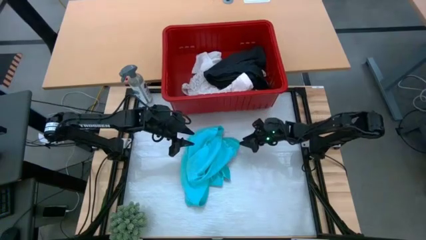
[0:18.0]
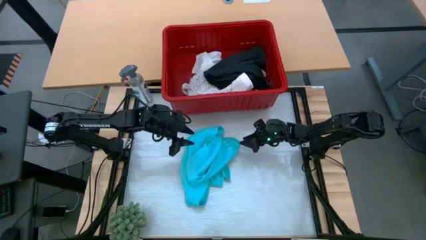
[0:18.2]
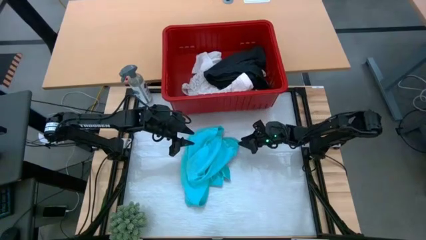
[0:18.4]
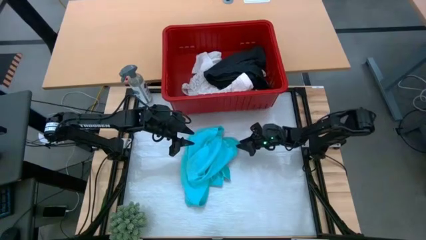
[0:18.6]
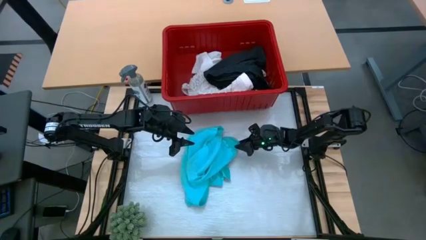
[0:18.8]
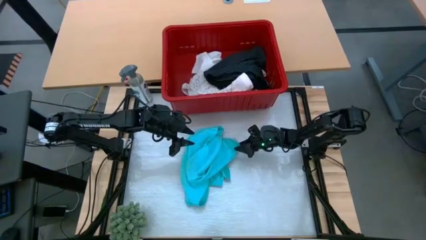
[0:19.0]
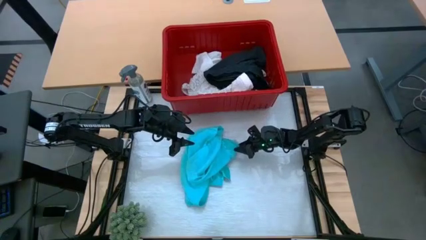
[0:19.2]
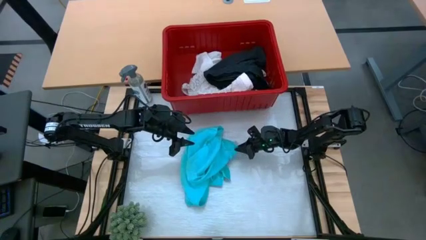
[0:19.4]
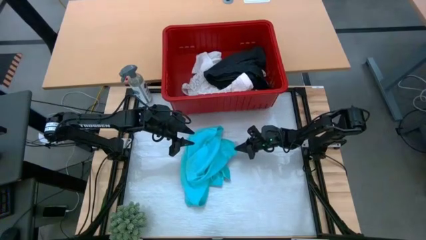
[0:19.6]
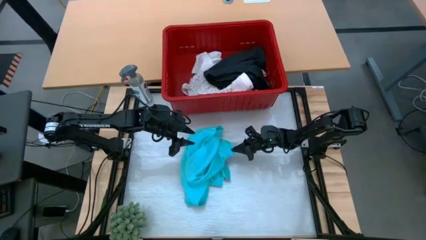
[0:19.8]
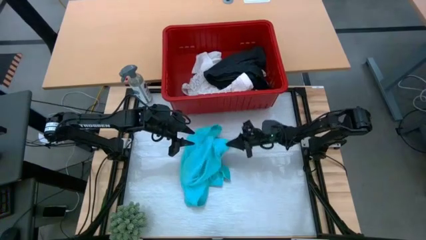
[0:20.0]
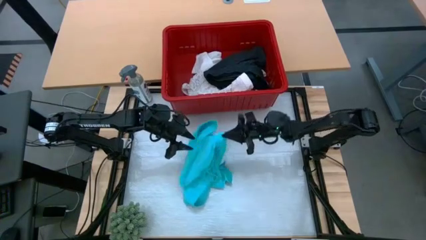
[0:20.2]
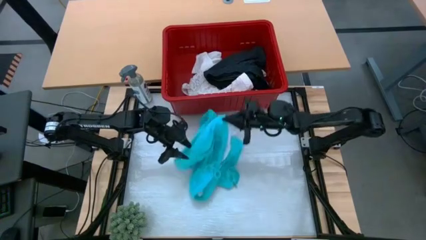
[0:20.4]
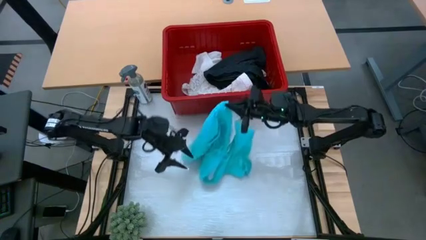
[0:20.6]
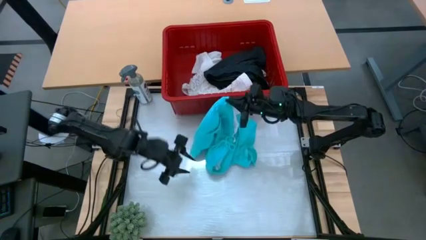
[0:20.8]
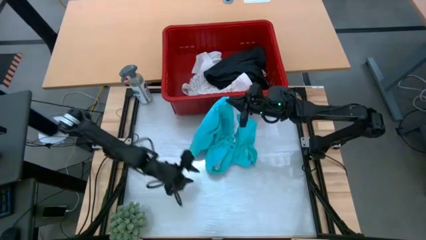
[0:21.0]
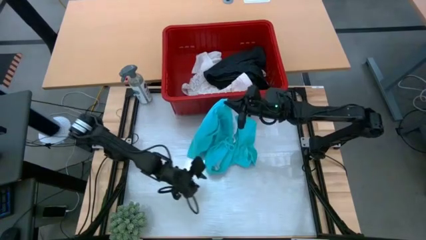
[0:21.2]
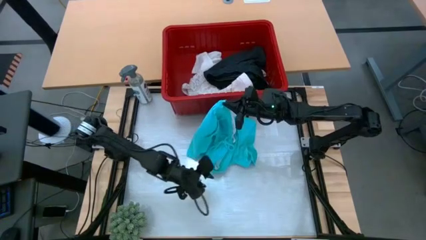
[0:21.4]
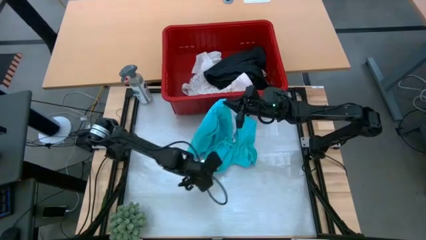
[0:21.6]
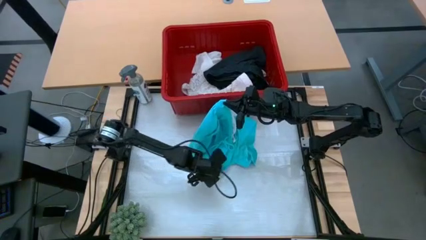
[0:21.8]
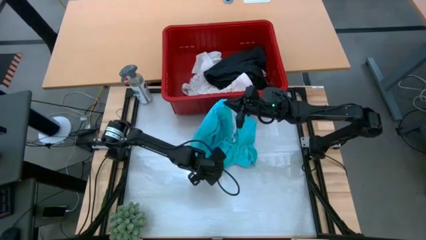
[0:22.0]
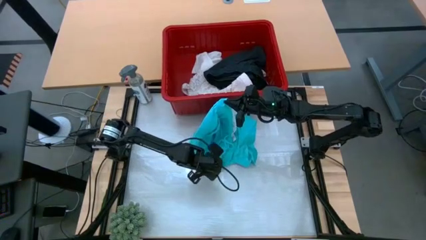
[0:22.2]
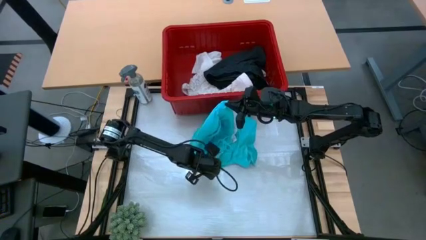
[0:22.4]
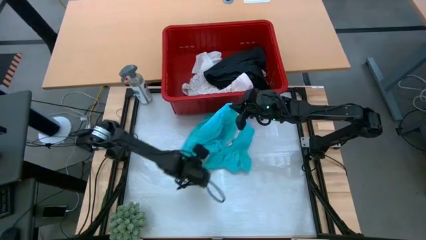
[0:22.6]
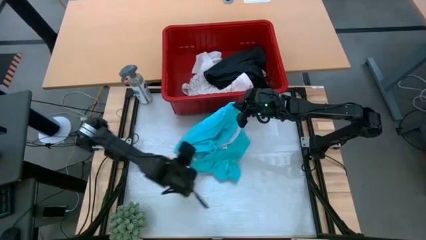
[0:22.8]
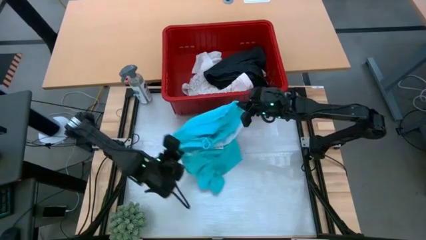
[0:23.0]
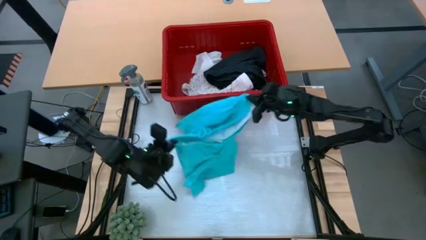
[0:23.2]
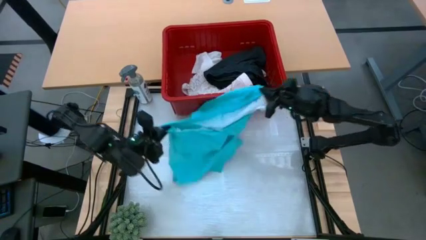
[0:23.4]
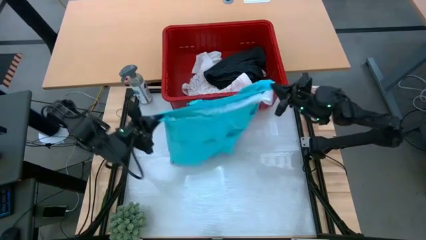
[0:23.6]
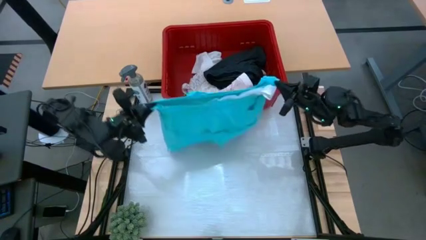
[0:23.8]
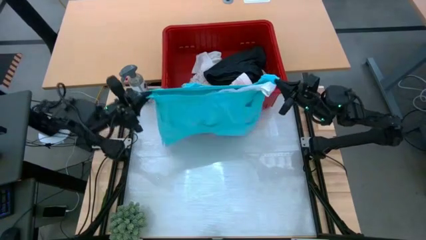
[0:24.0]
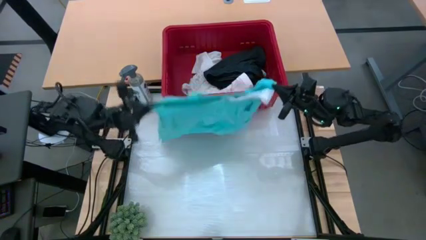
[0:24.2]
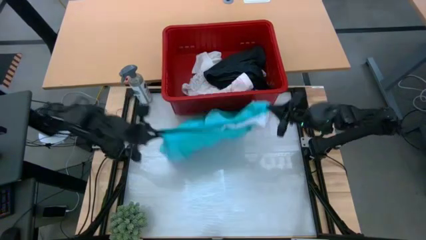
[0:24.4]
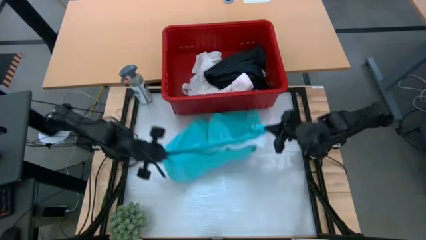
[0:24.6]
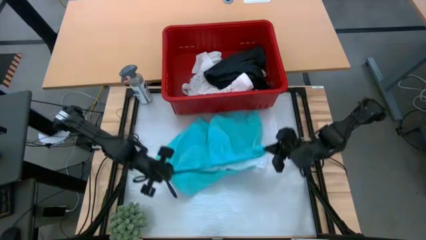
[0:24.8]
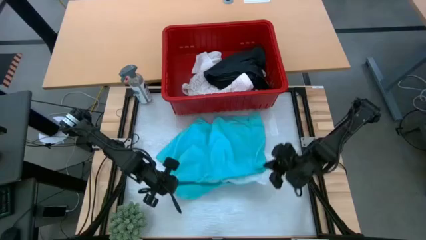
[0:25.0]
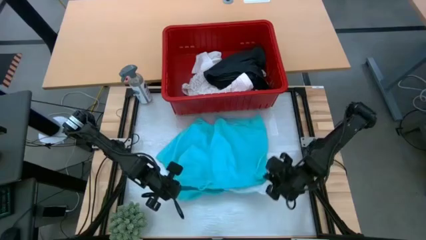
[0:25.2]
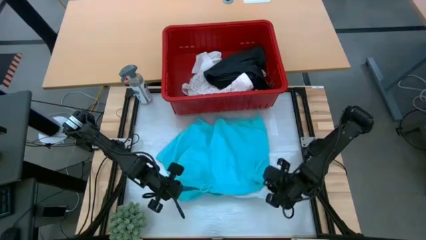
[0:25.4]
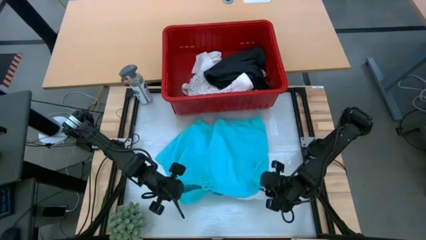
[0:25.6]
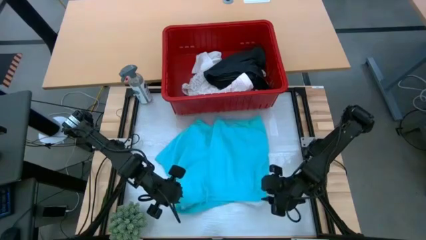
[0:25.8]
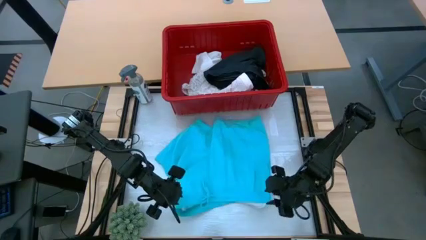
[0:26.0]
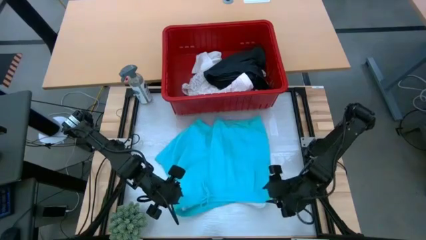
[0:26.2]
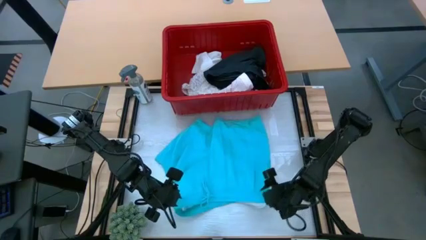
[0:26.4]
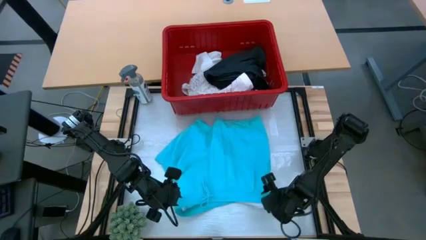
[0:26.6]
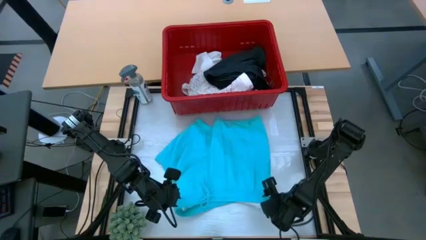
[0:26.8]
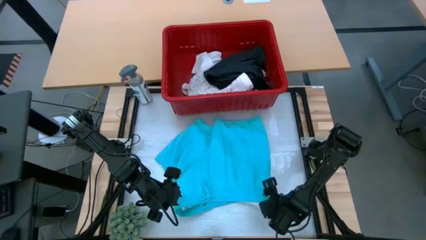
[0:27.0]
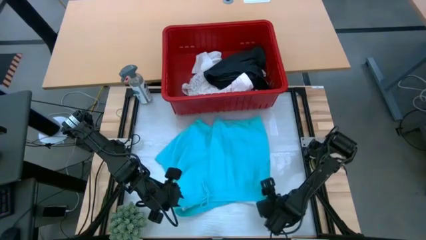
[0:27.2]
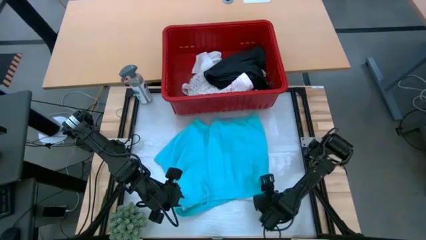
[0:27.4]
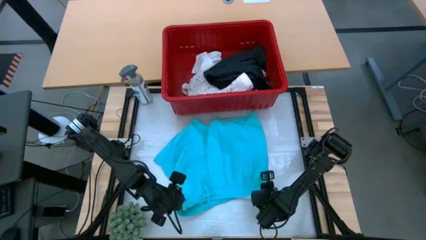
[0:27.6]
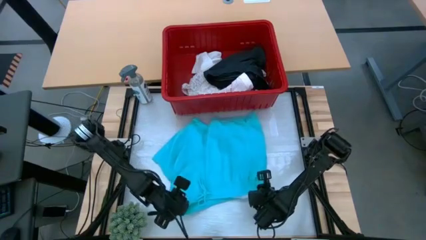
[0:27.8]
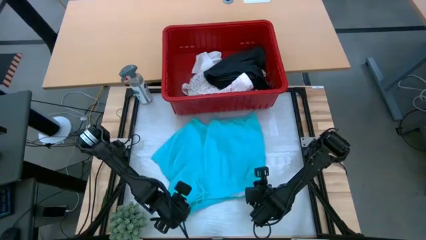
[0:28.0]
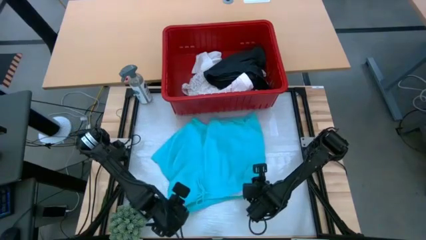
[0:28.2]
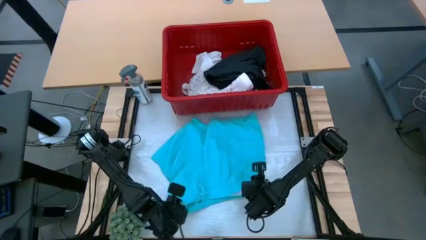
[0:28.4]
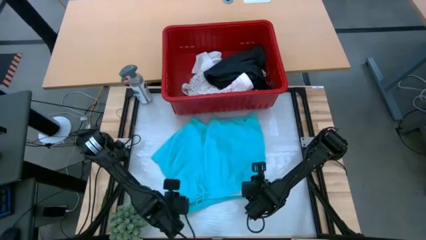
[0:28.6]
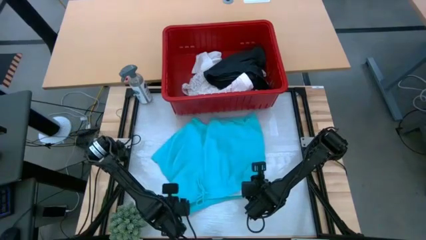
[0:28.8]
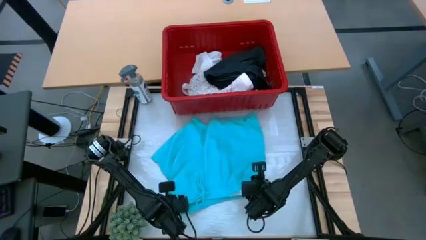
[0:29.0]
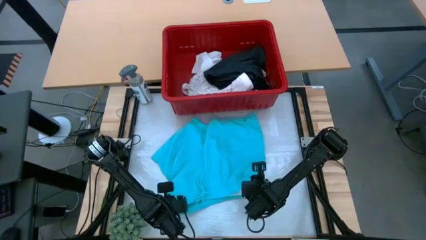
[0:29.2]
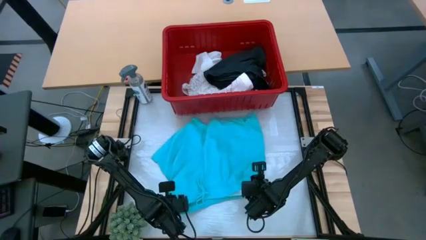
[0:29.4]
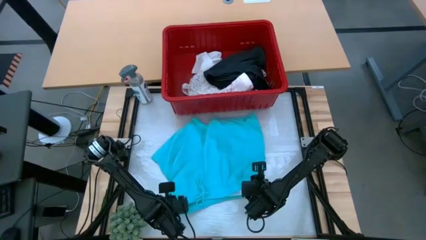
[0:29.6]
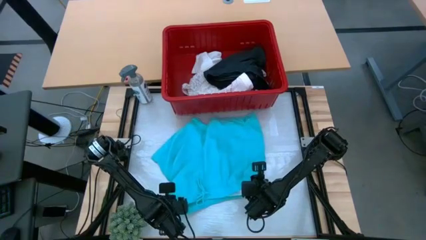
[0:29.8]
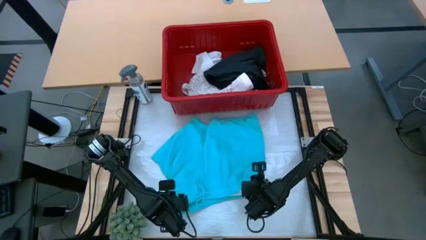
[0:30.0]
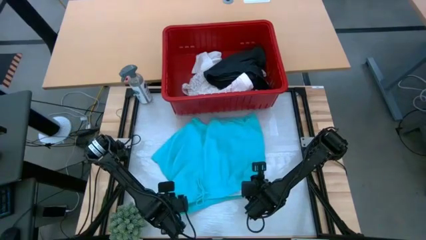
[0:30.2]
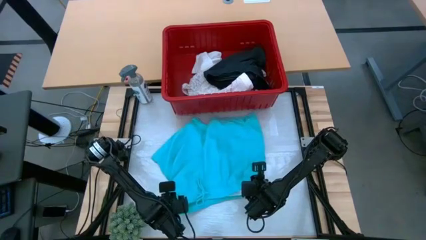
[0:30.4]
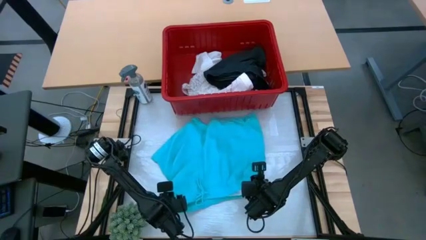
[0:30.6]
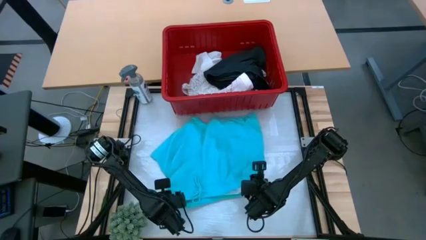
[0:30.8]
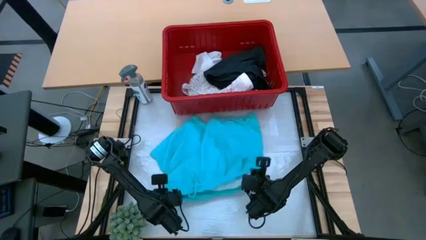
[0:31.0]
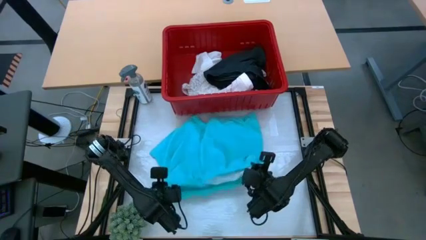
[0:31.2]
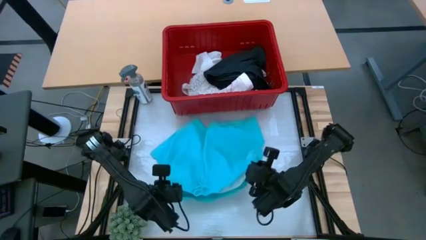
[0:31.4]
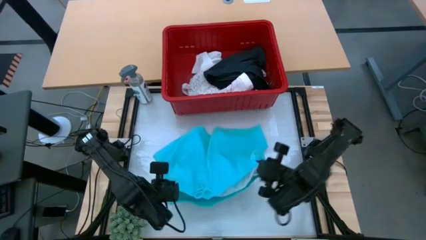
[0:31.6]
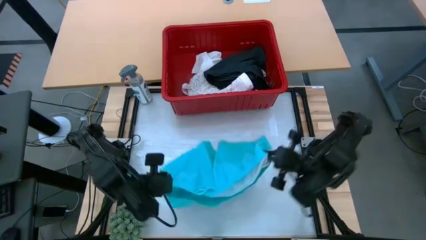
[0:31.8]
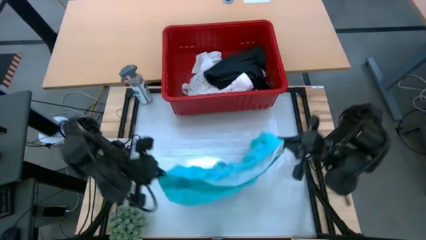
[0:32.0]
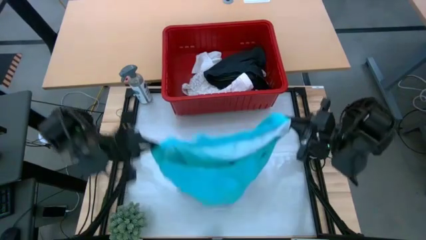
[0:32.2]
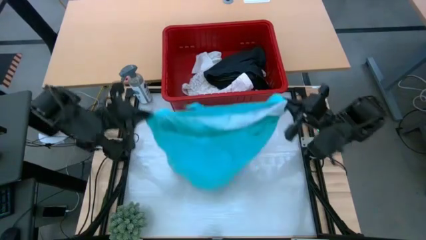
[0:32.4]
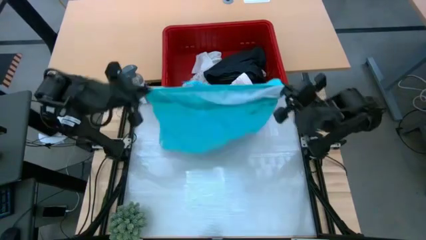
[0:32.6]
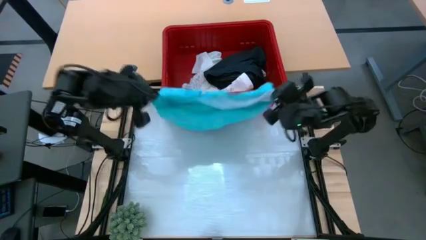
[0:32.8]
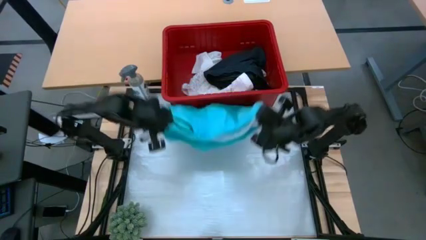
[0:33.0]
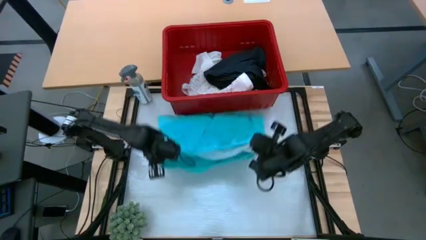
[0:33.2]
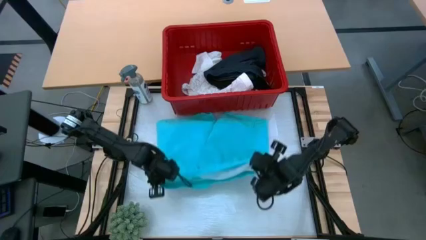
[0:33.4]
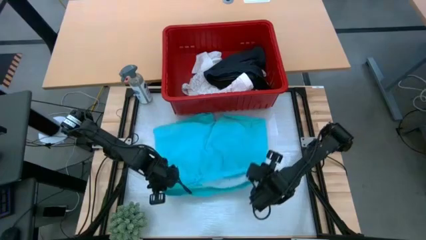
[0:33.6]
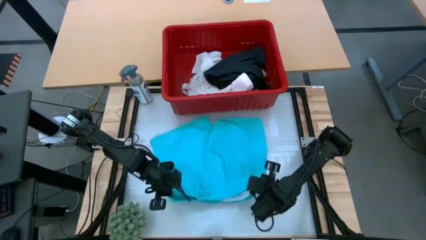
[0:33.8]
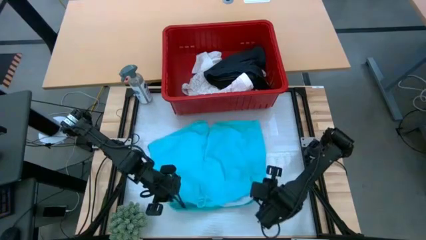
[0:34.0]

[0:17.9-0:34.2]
Task: Fold laundry
Fold the light blue shorts

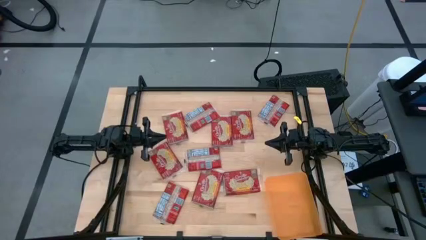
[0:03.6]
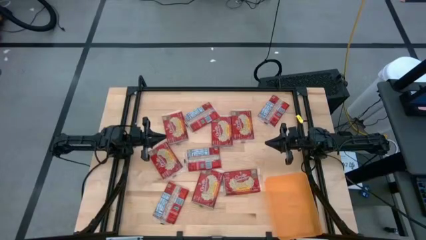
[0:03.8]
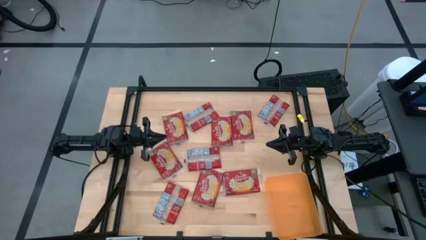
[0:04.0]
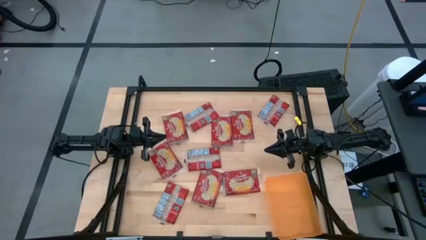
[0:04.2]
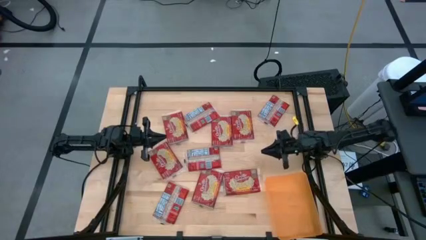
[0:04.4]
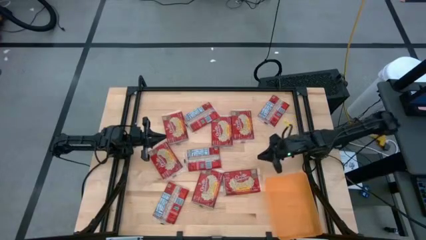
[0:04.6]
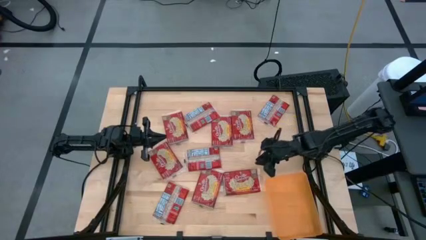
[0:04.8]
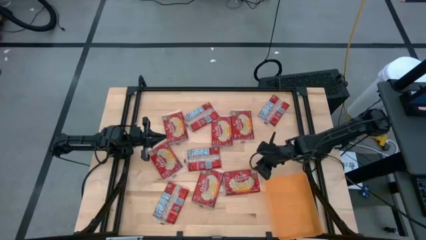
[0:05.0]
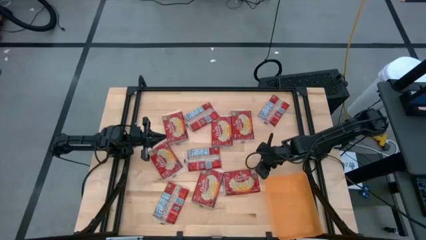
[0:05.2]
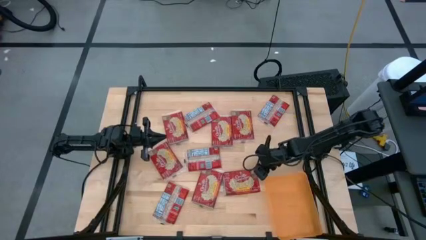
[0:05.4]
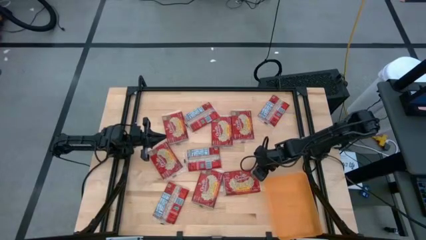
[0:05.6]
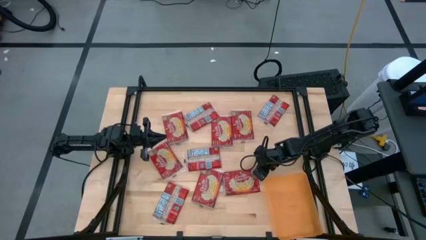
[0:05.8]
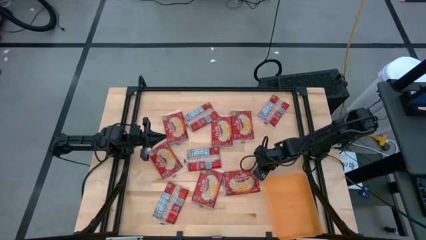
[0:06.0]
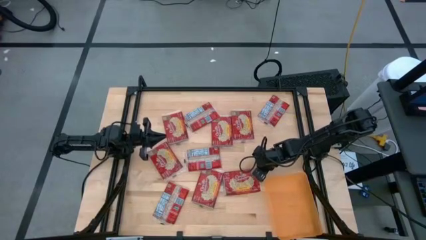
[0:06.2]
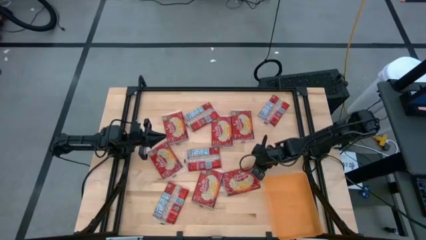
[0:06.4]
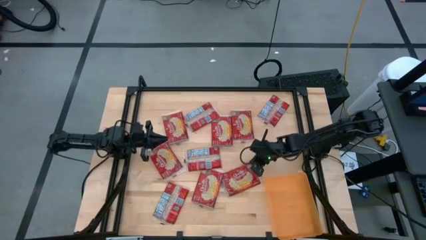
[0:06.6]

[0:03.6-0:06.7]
Task: Sort popcorn bags into baskets
Put the popcorn pack into the orange bin
